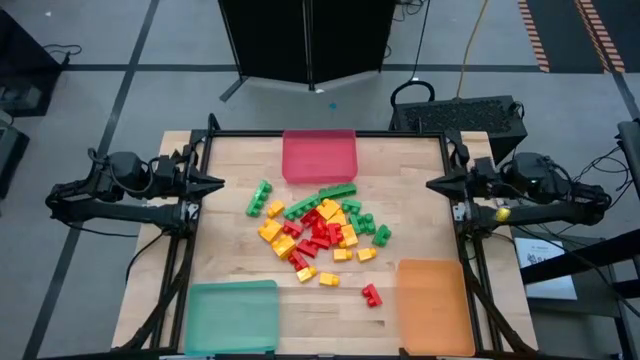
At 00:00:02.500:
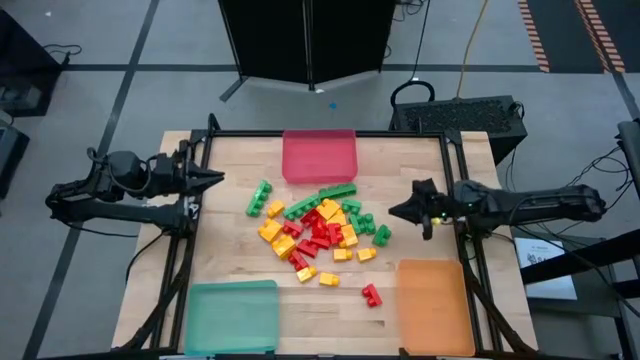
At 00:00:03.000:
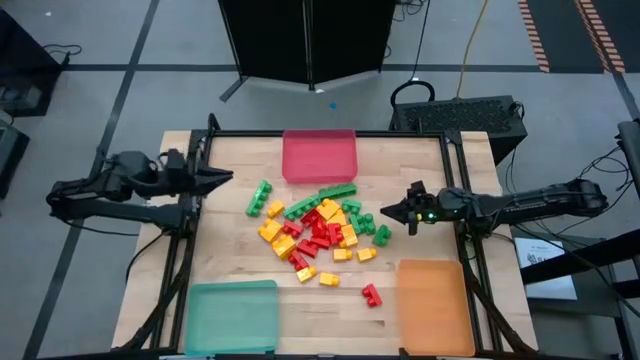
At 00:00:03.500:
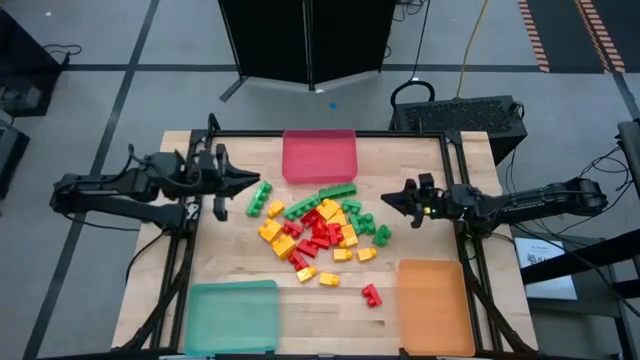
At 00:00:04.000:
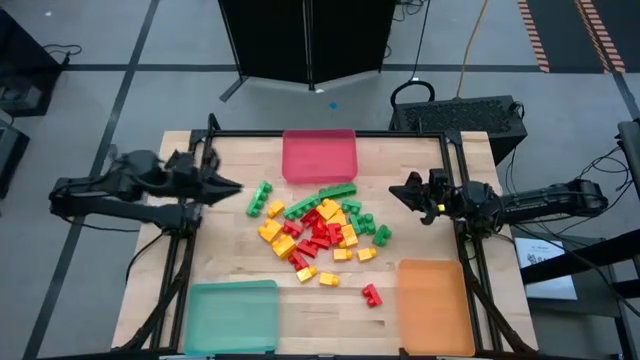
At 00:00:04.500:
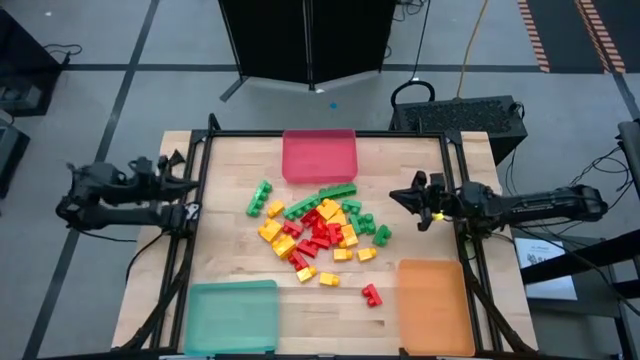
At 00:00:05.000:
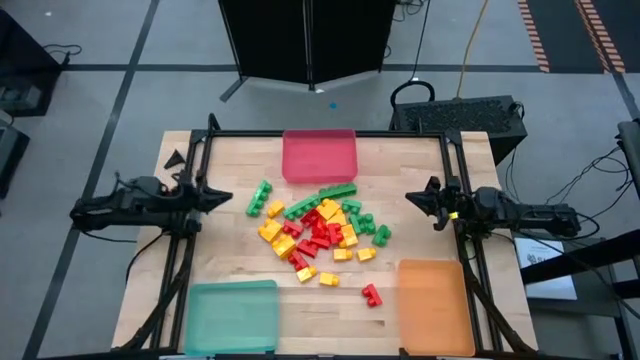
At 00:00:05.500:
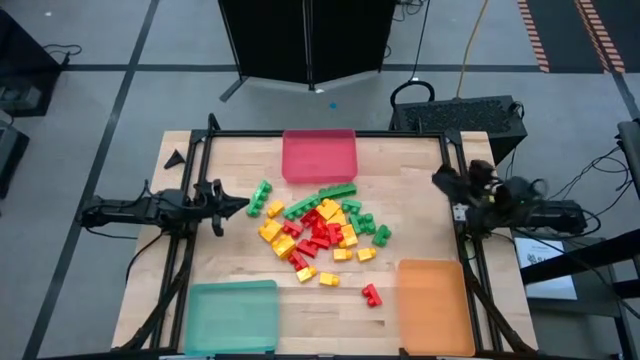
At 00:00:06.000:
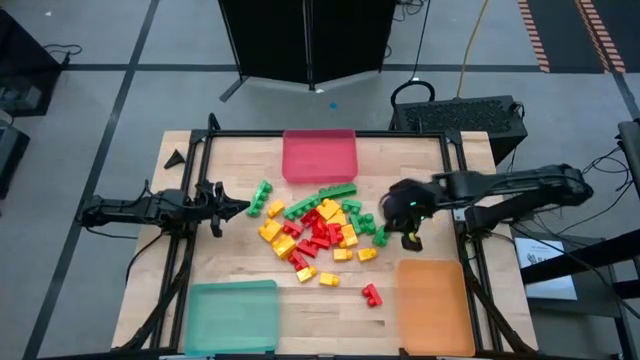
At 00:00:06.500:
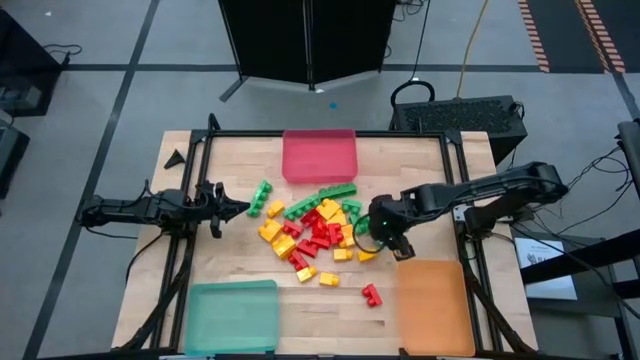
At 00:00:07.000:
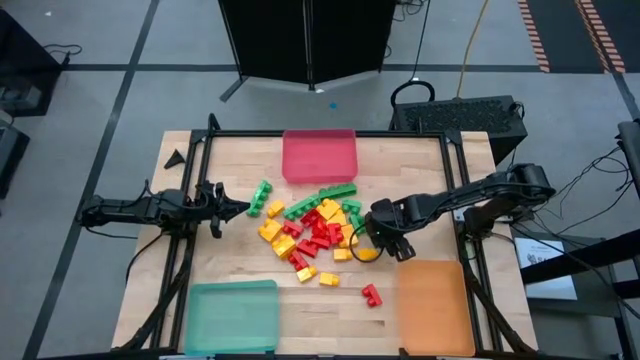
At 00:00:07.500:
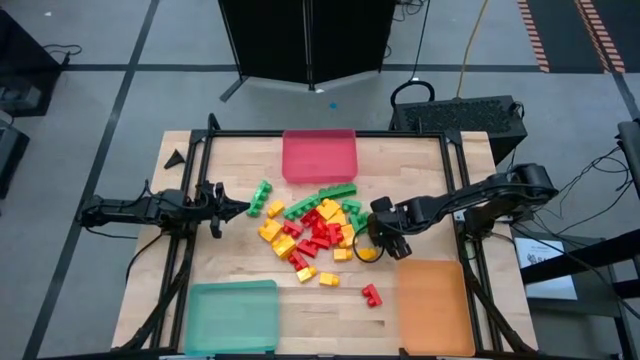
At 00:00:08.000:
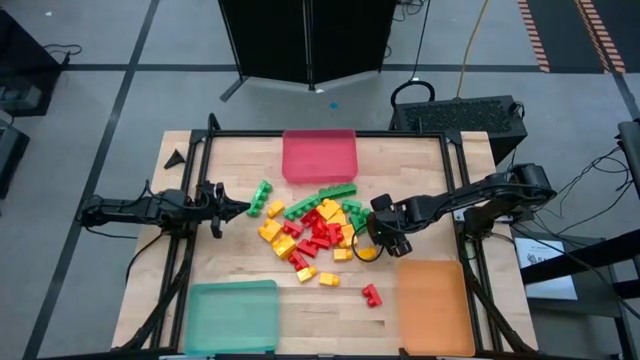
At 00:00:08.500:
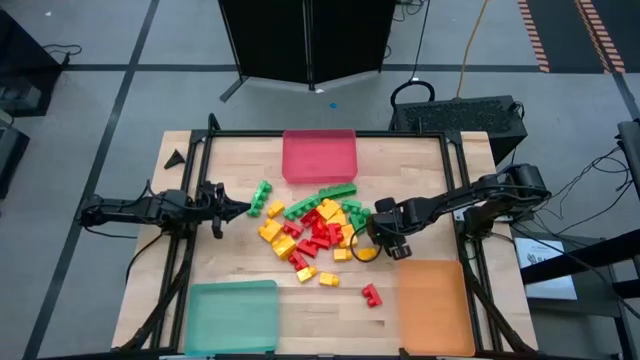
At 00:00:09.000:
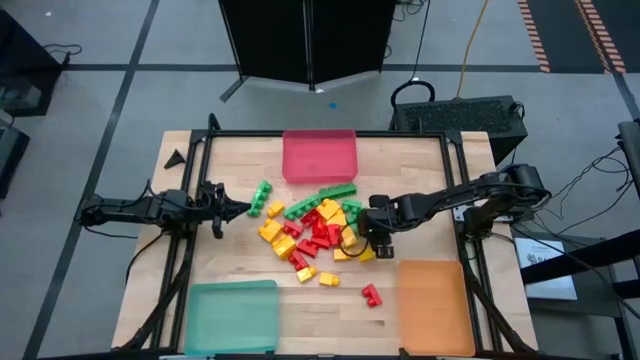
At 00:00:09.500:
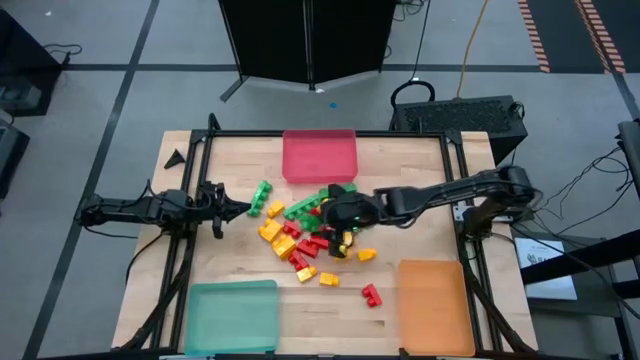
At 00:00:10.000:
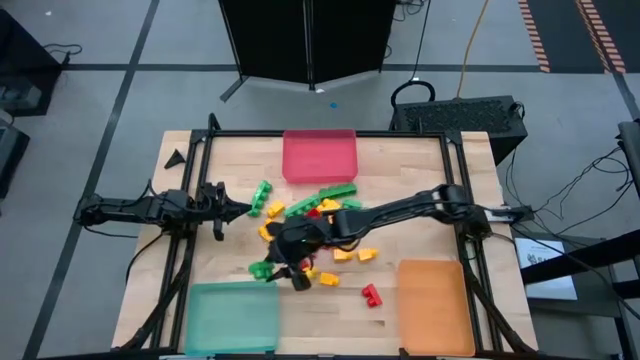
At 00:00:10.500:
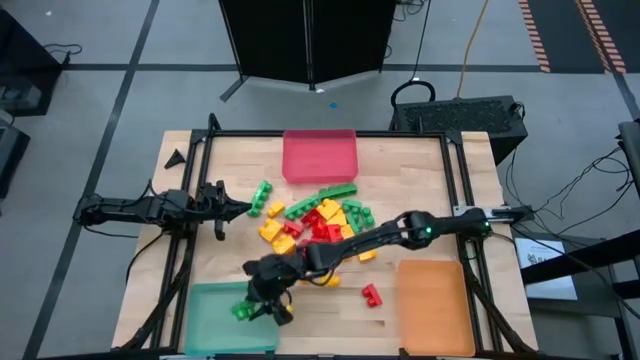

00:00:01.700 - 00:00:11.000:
Task: Sort blocks
Put the green game piece into the green bin

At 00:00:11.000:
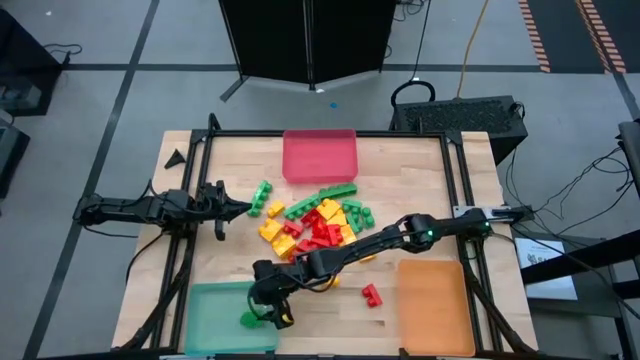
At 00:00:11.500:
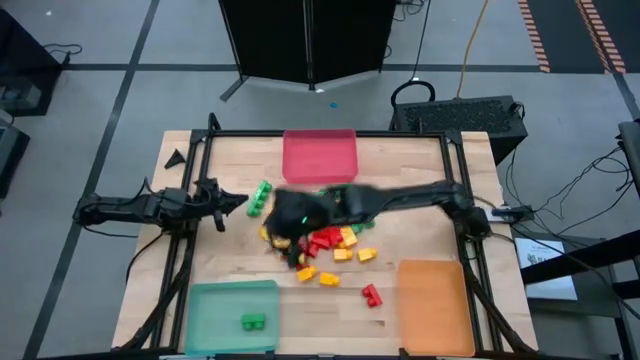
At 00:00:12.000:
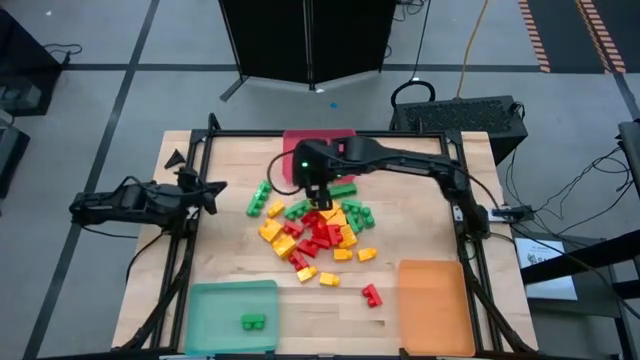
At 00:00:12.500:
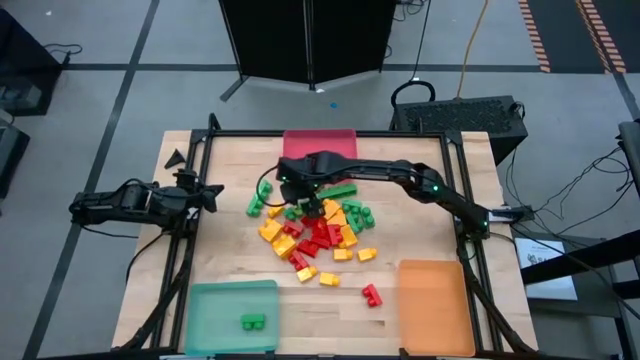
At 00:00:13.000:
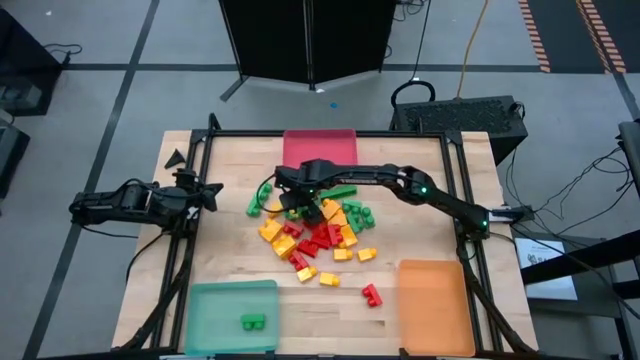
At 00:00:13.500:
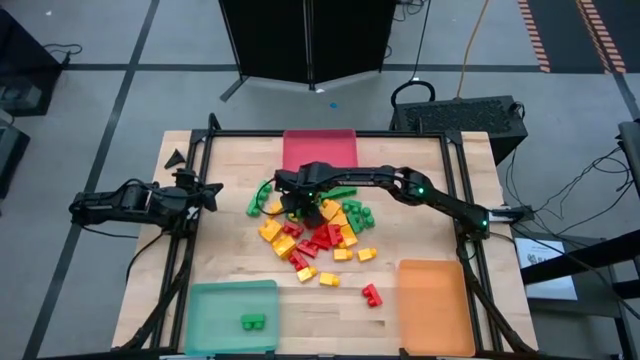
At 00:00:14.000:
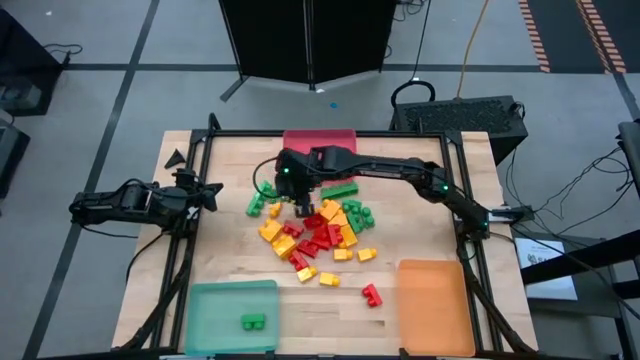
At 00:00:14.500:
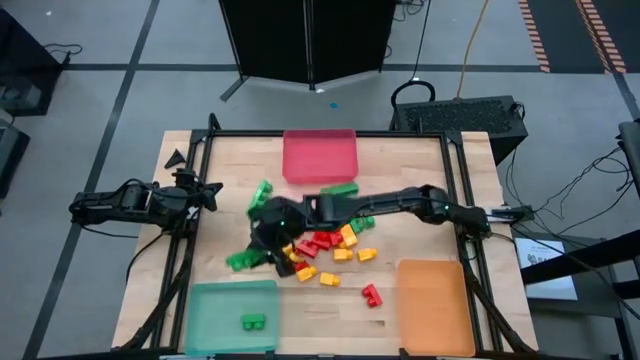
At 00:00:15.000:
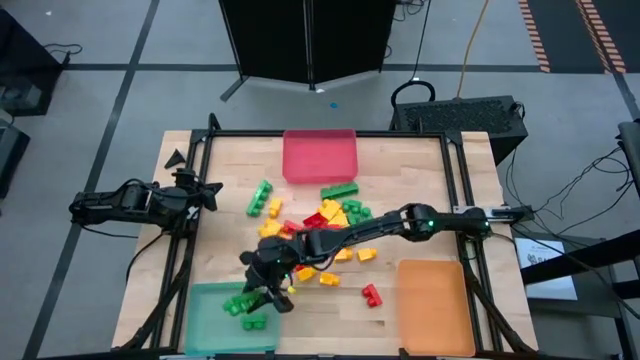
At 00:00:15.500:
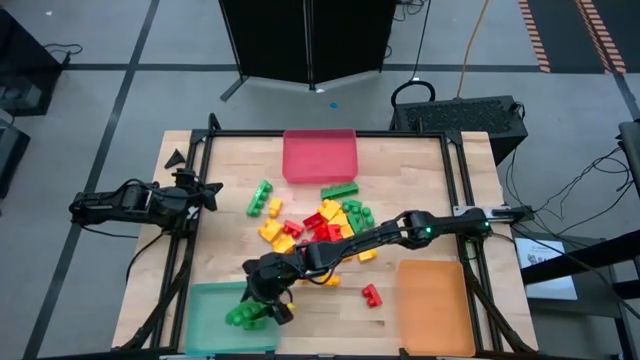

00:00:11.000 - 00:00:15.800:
Put the green game piece into the green bin

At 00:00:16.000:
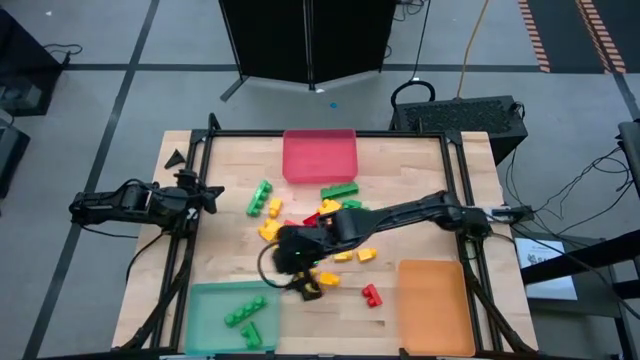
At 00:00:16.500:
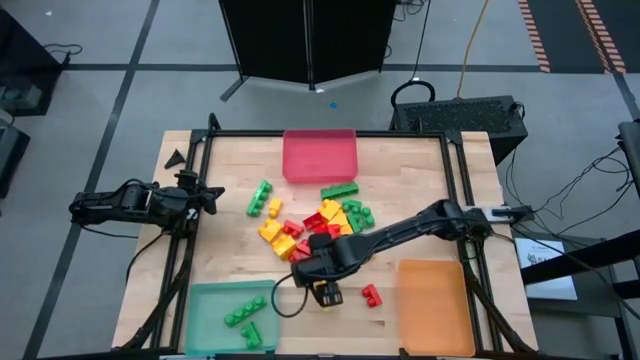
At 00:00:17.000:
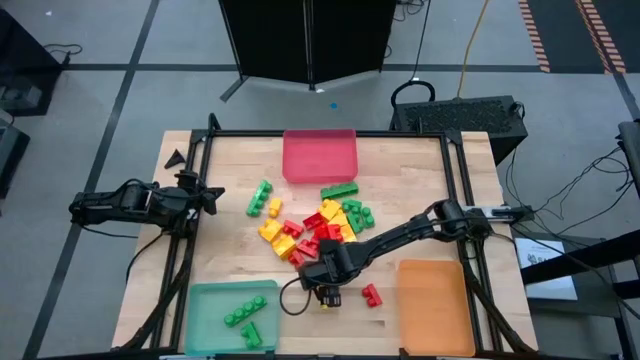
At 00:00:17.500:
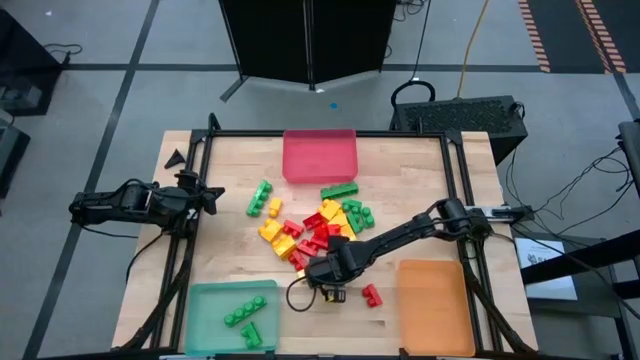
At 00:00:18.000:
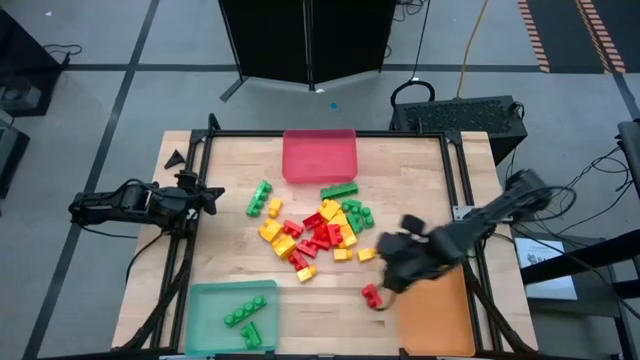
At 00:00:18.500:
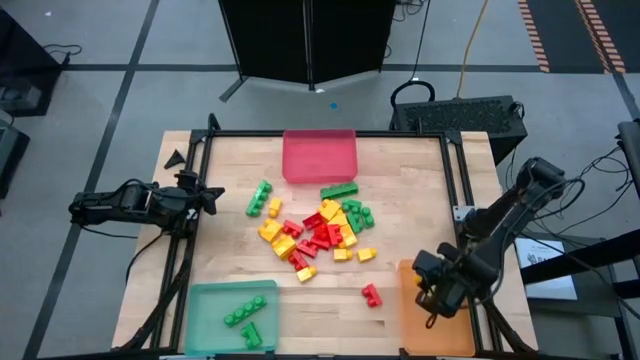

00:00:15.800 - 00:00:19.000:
Put the yellow game piece into the orange bin

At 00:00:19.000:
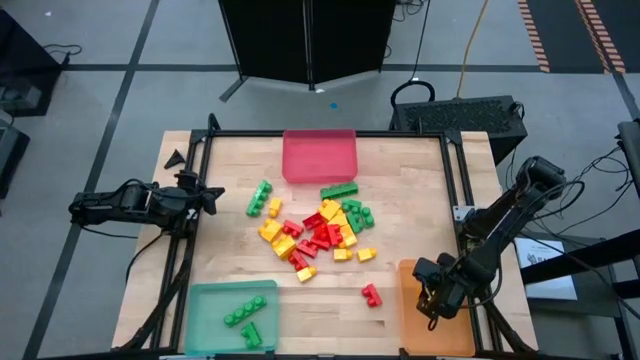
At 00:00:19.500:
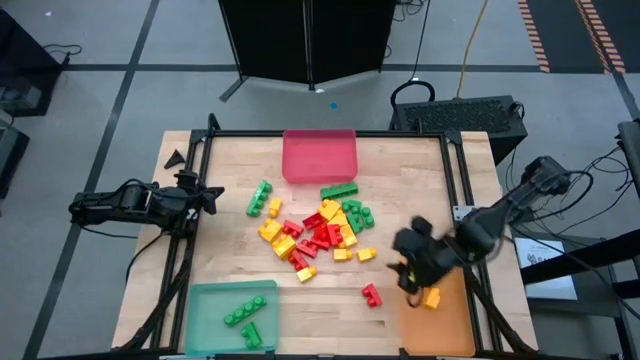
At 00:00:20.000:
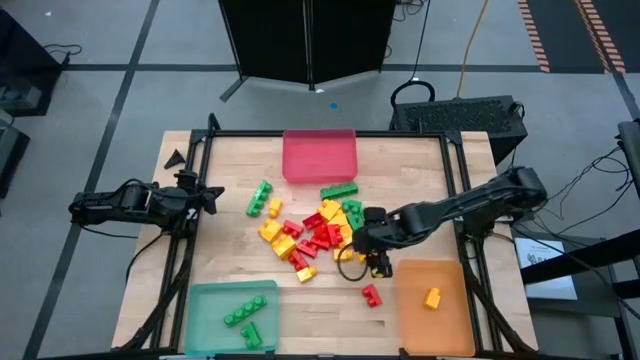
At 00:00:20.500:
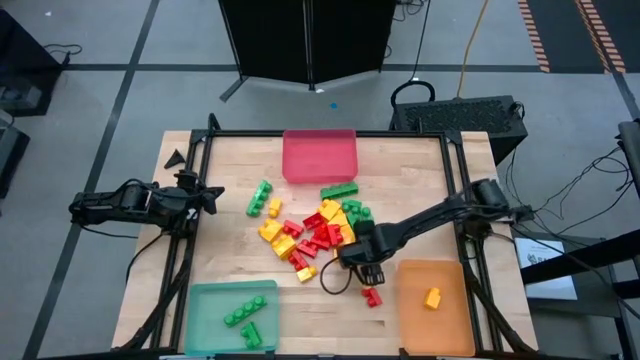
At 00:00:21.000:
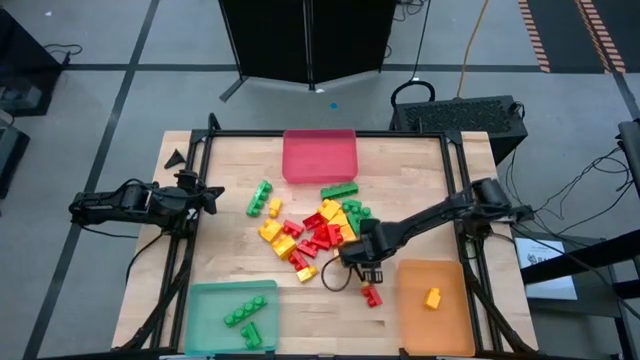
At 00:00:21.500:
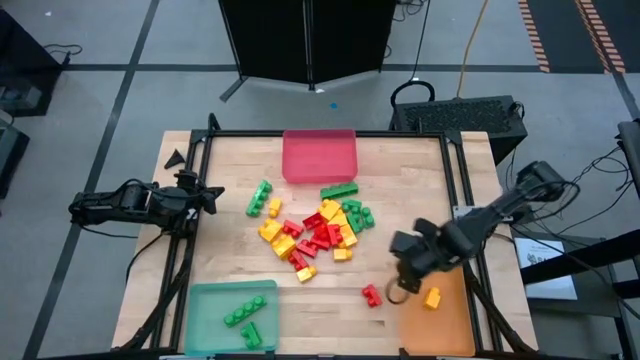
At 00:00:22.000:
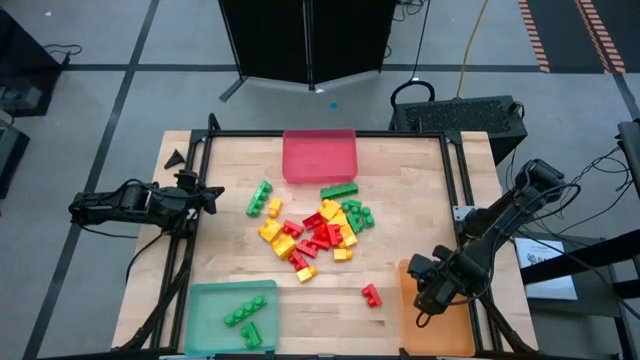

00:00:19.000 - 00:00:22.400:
Put the yellow game piece into the orange bin
